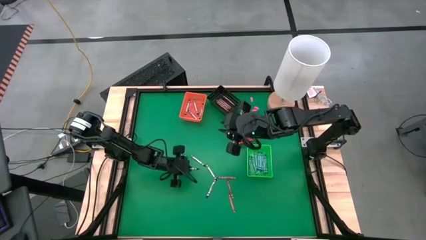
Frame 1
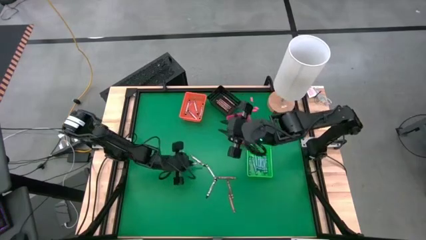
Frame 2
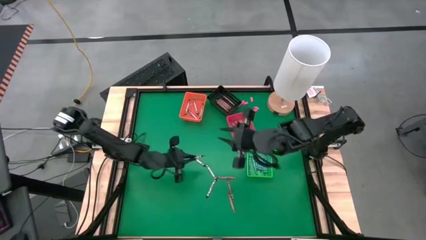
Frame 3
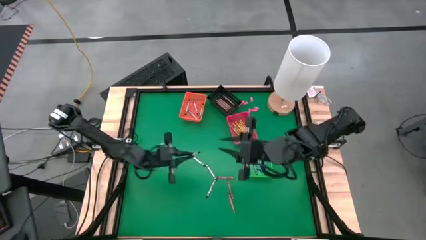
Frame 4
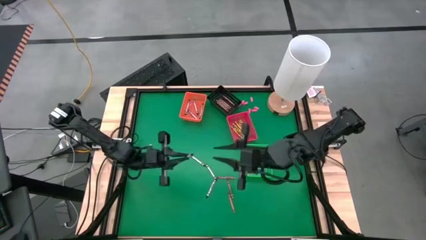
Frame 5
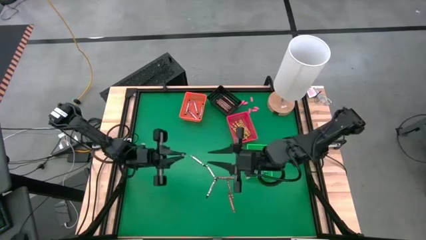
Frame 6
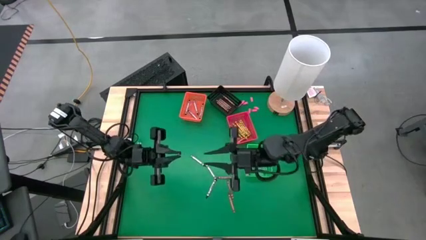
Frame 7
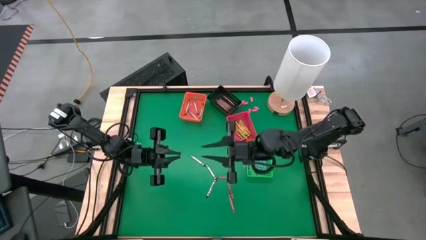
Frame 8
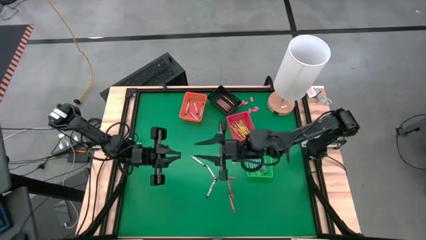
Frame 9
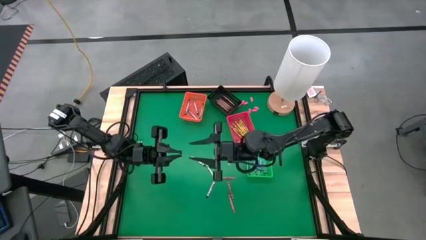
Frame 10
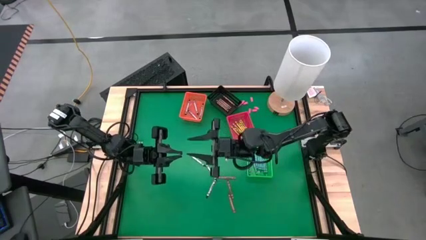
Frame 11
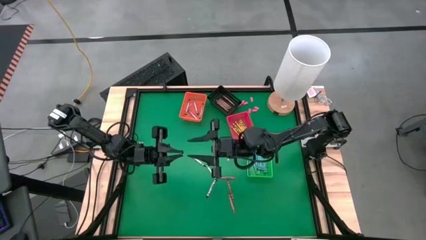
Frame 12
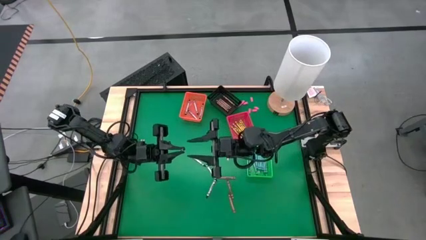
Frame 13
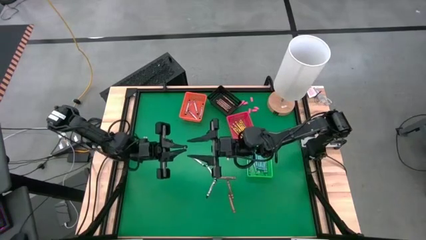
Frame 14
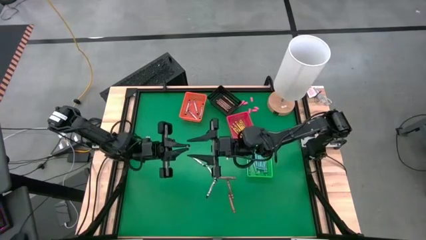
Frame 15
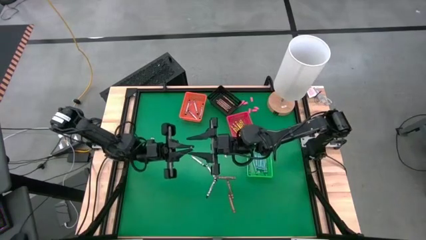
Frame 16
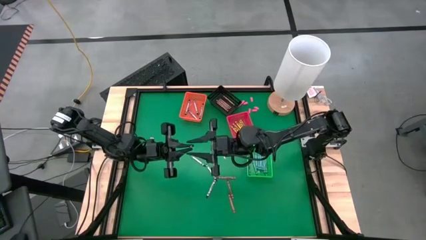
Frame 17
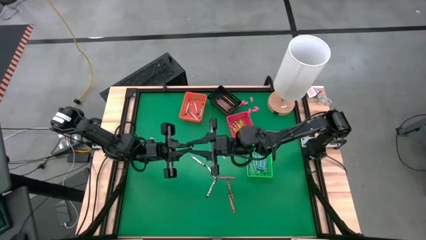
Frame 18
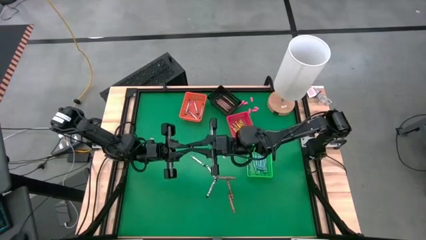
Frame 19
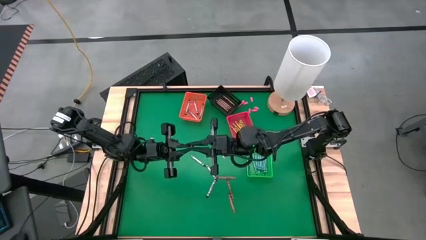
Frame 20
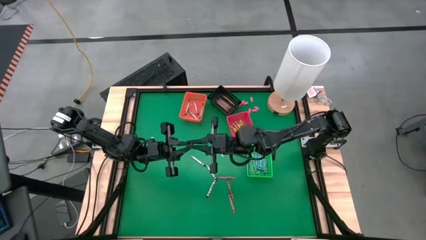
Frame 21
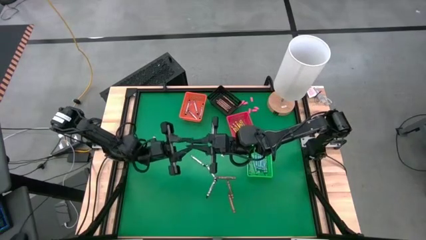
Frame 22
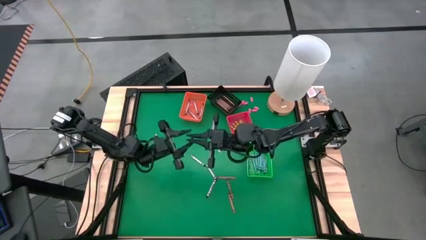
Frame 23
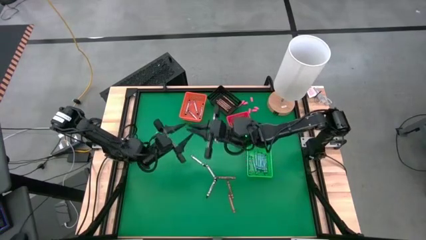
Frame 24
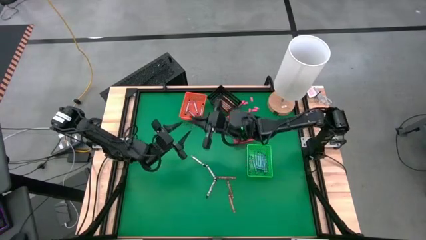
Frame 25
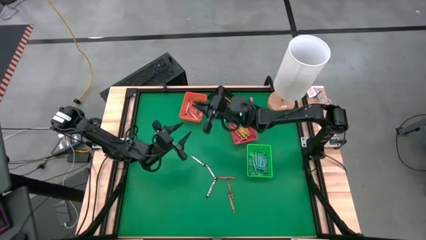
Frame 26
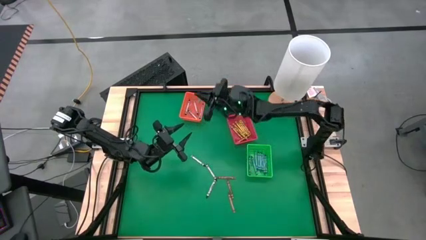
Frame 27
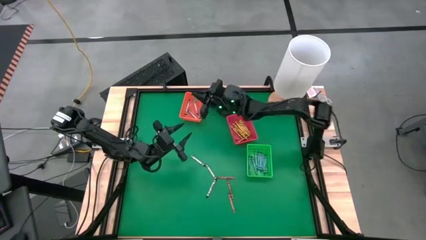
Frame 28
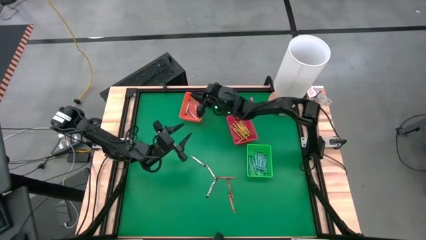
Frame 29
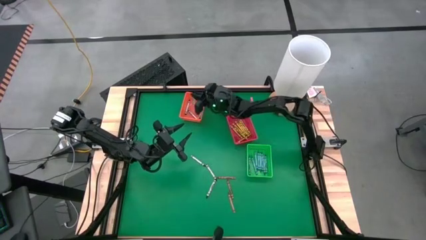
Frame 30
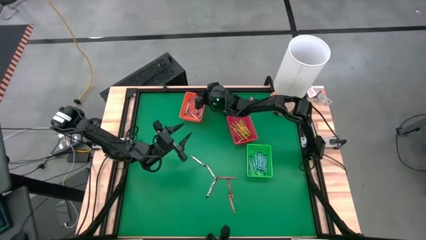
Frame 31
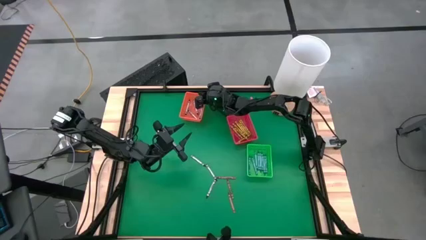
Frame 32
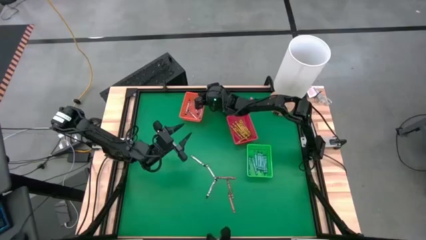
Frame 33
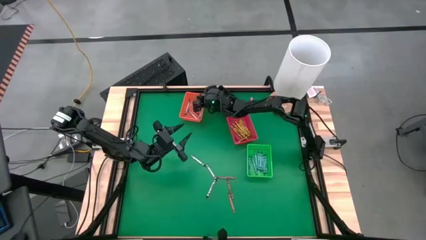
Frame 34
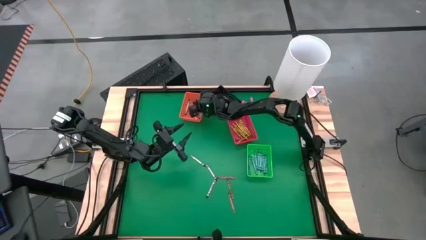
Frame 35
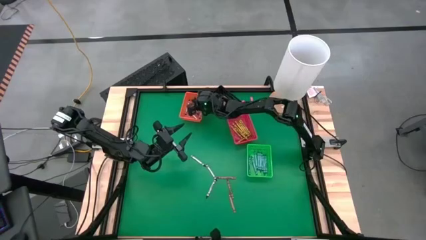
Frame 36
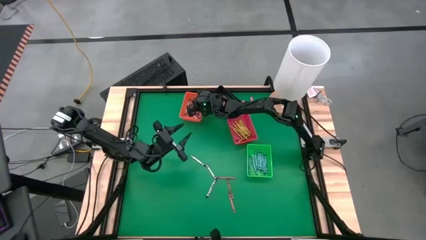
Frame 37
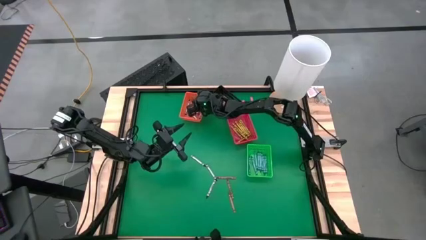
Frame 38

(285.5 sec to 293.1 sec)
Task: Sort crayons
Put the black crayon into the orange bin

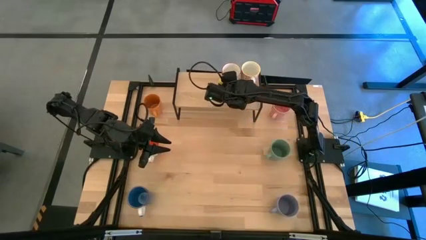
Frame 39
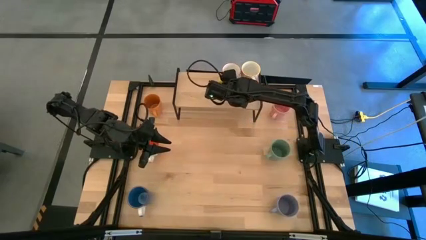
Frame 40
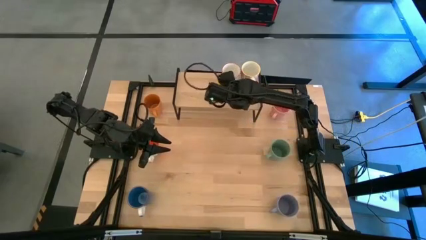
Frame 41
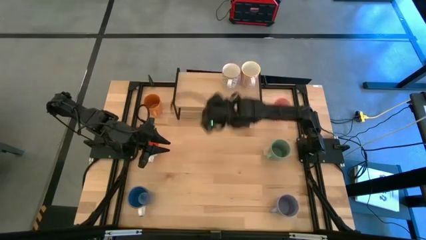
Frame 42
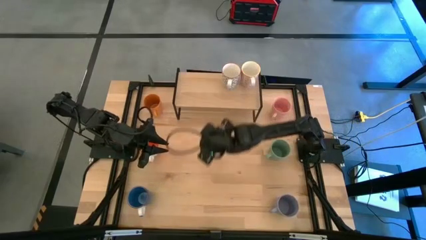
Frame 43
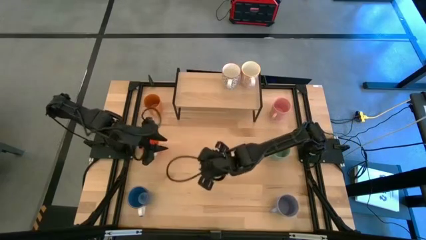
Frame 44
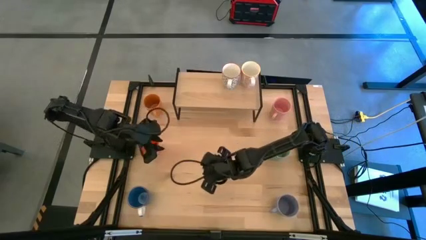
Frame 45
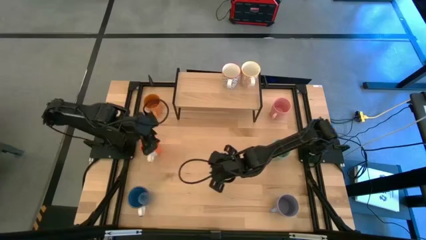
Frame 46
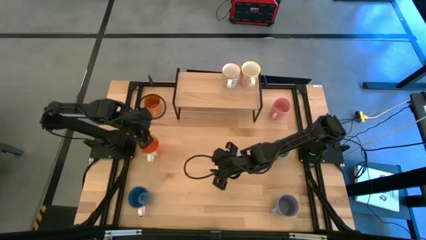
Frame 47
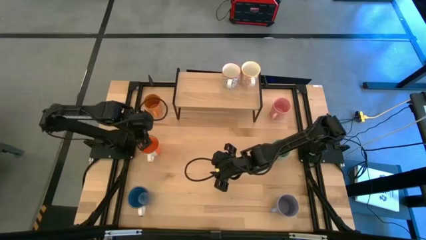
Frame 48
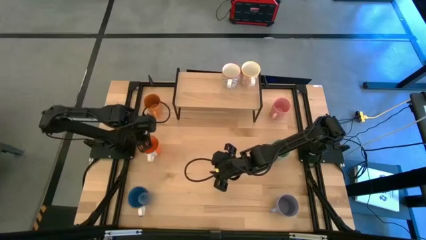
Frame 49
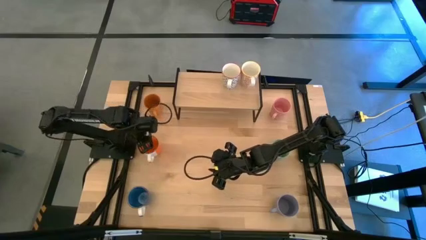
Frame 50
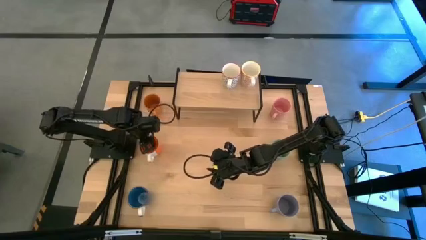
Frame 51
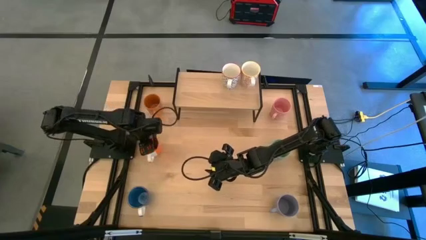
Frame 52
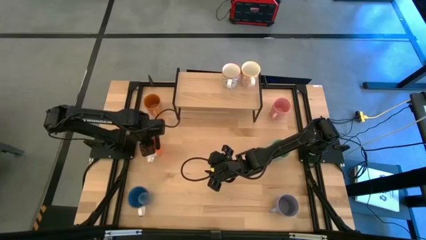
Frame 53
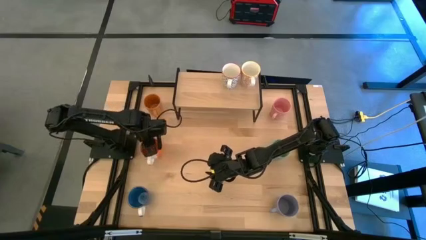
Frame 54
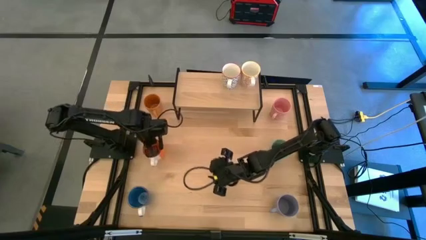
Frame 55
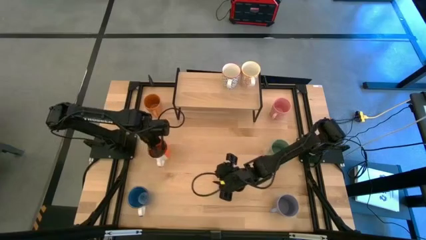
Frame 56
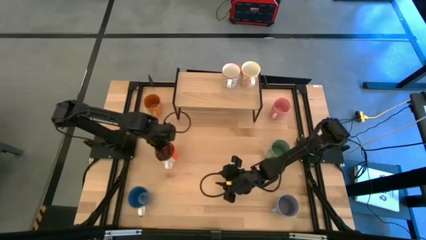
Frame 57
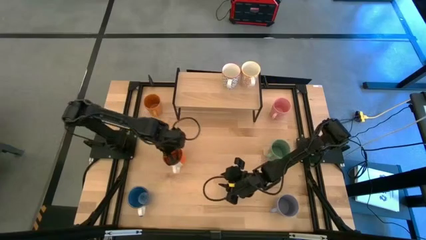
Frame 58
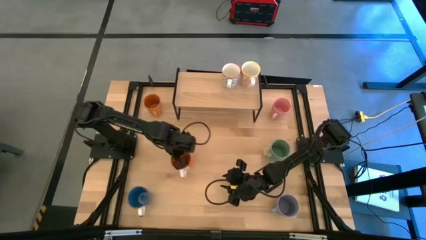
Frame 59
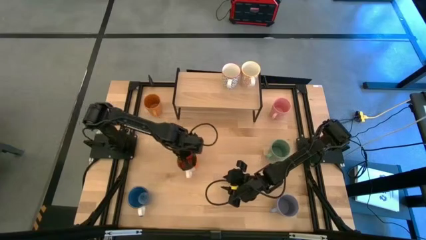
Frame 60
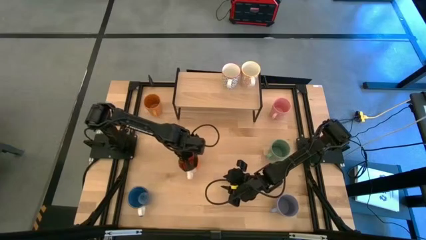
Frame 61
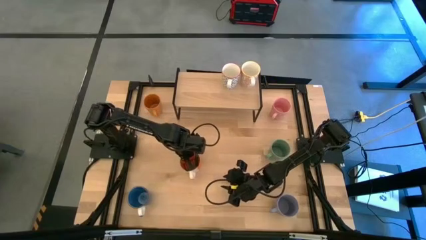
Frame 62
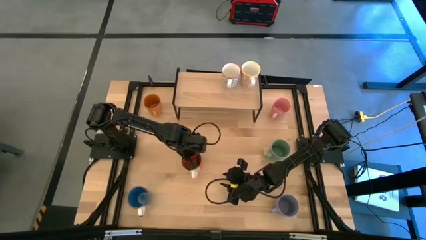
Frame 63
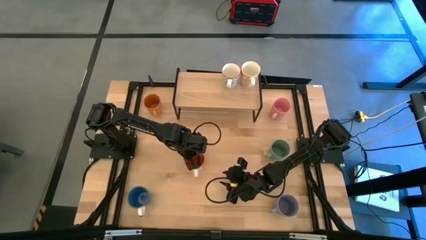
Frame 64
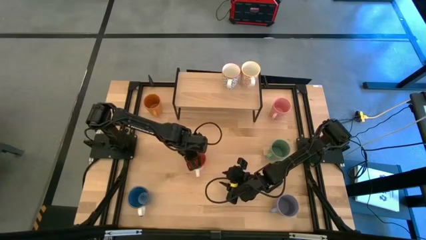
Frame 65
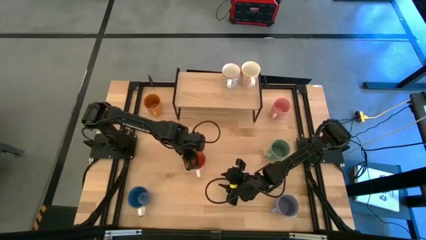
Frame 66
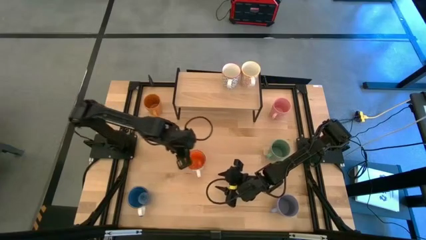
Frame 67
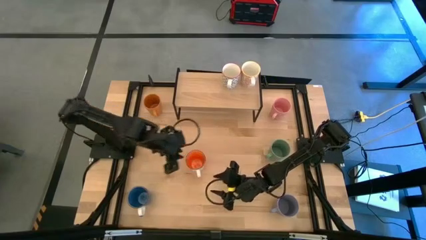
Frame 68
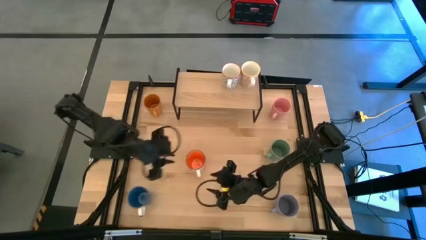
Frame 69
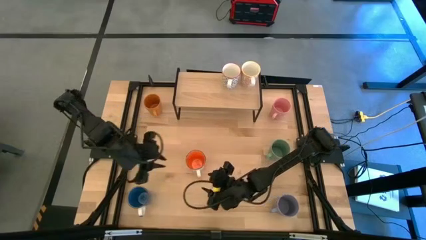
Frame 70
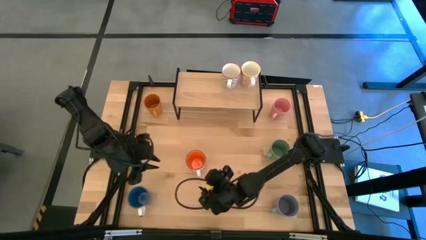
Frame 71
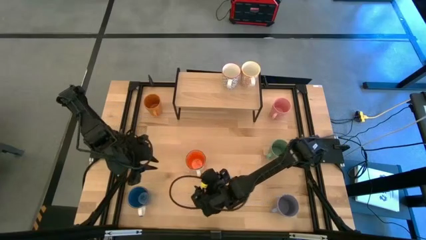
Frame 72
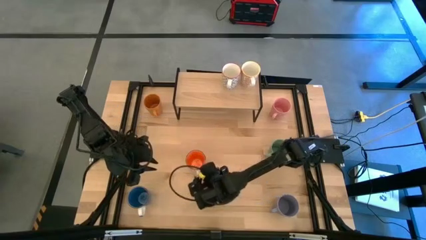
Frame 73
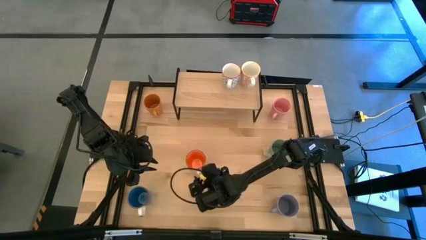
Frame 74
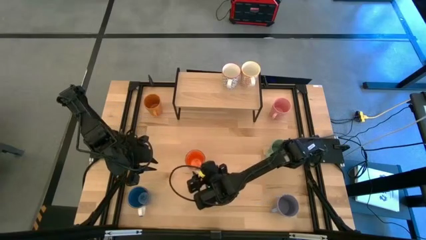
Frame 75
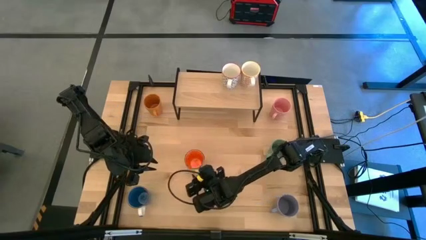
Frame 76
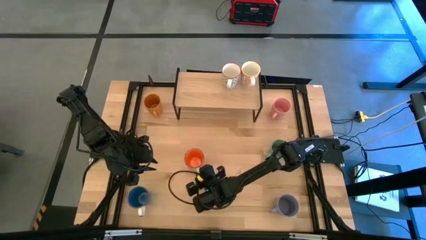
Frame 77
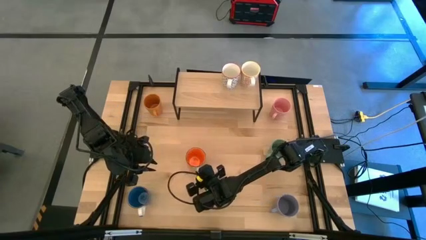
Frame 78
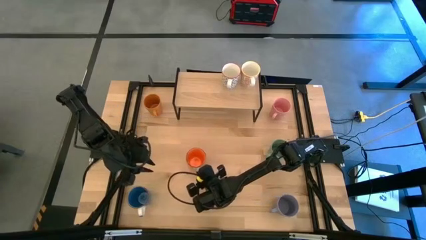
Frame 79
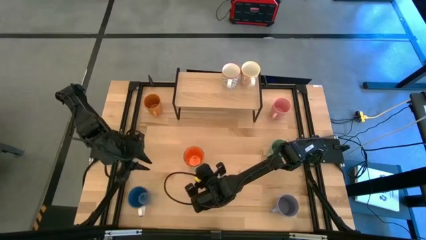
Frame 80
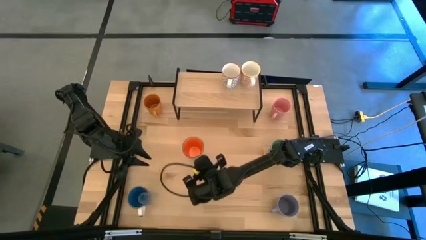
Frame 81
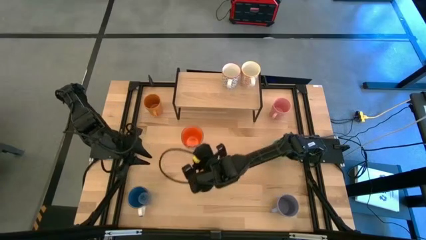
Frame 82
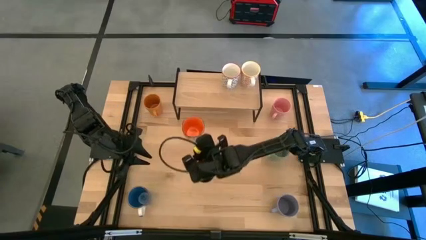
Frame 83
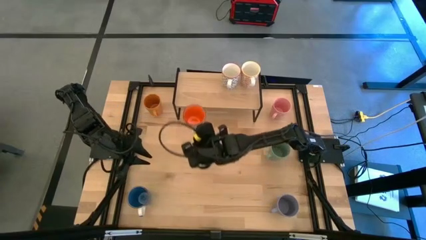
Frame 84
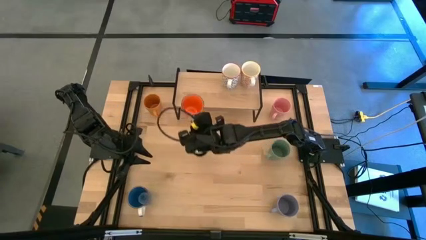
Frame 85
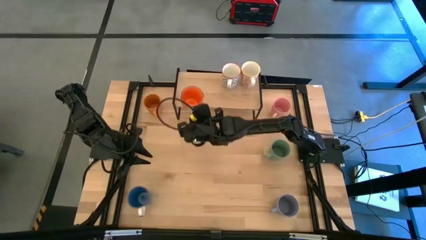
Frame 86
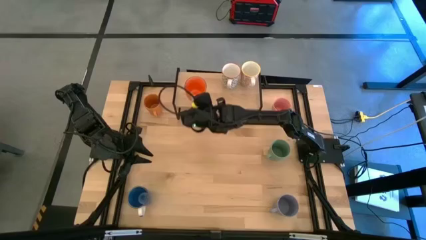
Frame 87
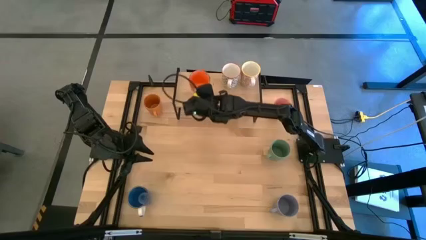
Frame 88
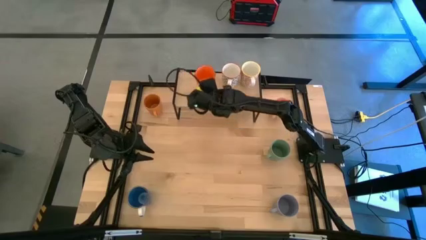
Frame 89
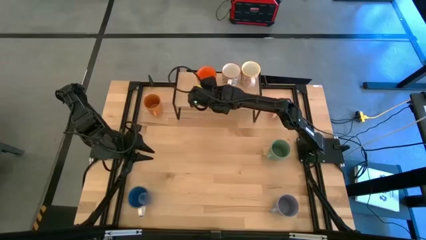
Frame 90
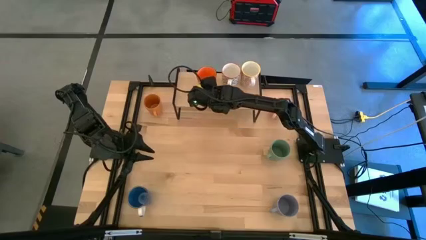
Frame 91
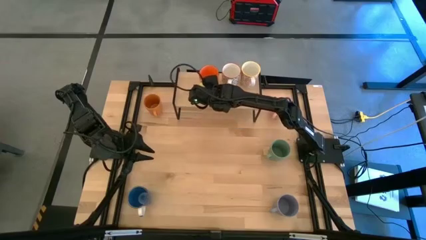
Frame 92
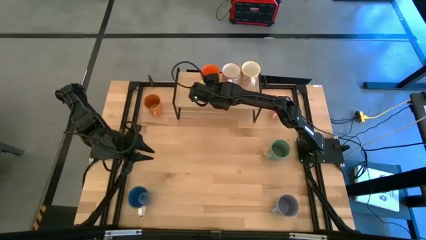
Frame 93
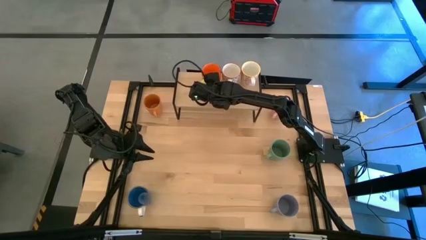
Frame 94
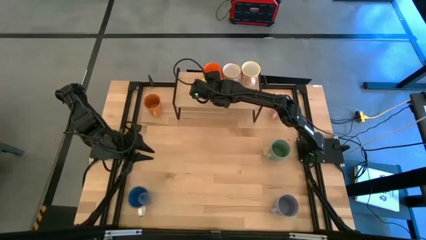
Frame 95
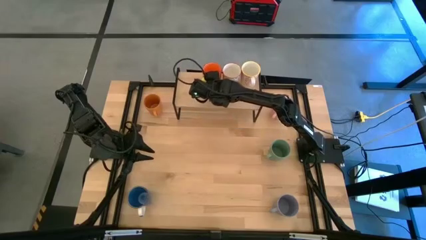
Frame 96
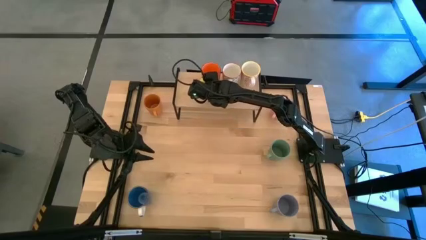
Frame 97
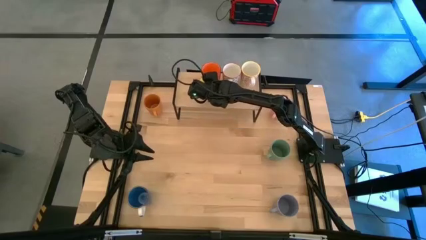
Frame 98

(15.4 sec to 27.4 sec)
Task: Place coffee mugs
Put the orange mug on the shelf
